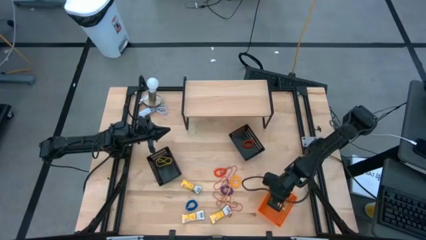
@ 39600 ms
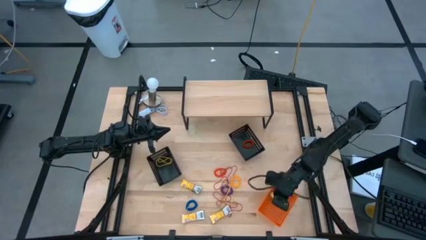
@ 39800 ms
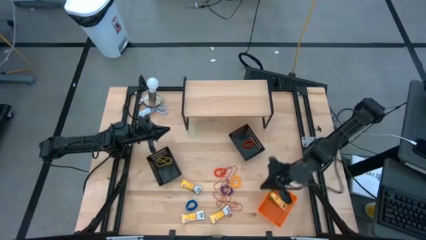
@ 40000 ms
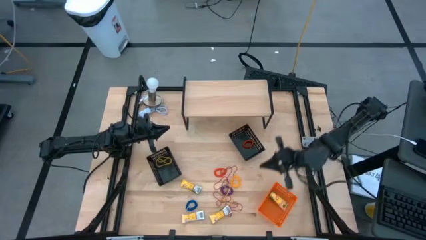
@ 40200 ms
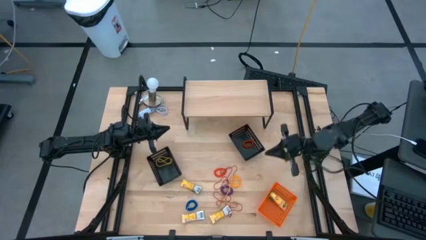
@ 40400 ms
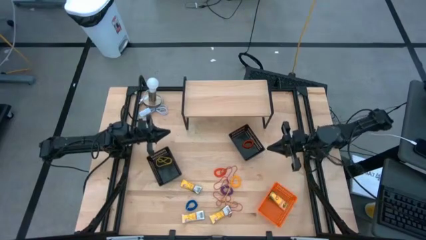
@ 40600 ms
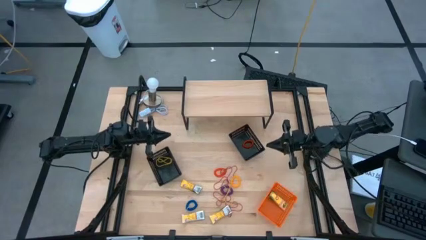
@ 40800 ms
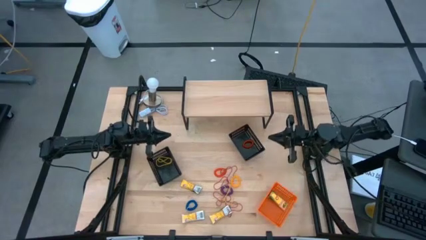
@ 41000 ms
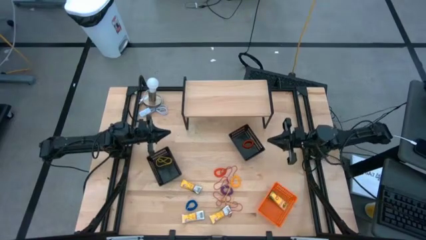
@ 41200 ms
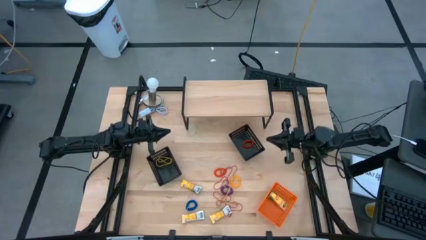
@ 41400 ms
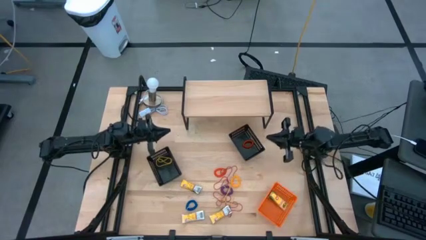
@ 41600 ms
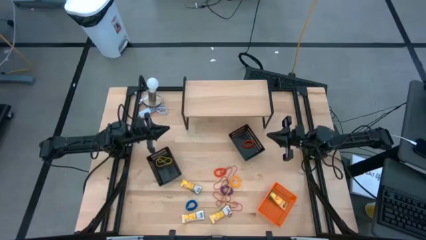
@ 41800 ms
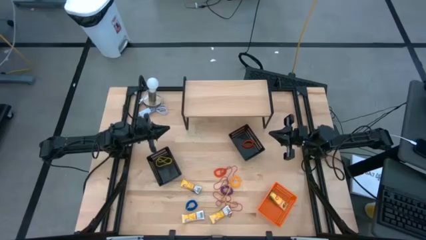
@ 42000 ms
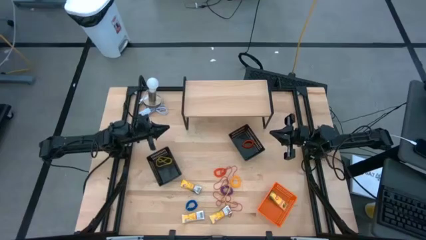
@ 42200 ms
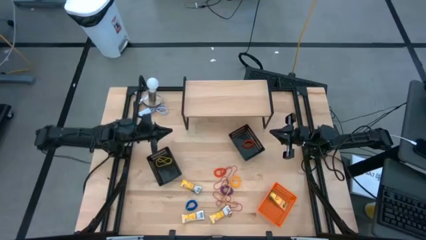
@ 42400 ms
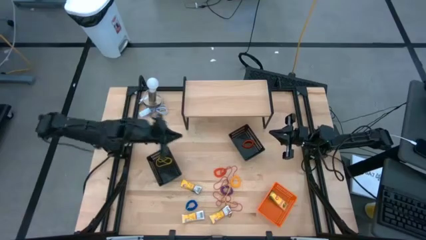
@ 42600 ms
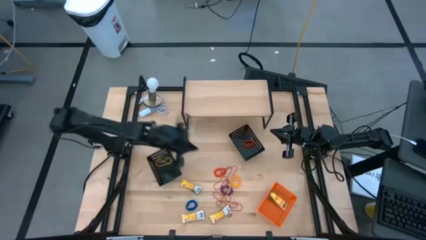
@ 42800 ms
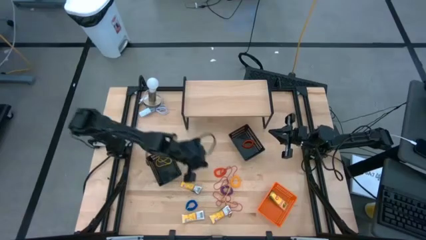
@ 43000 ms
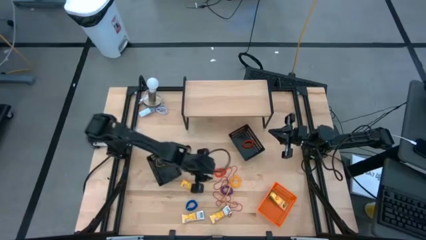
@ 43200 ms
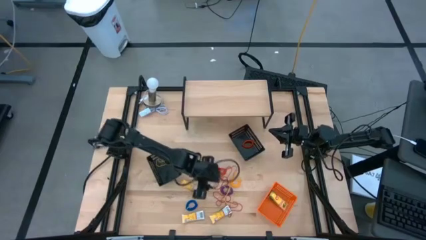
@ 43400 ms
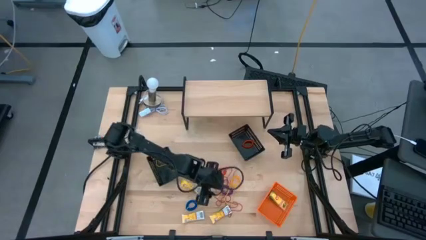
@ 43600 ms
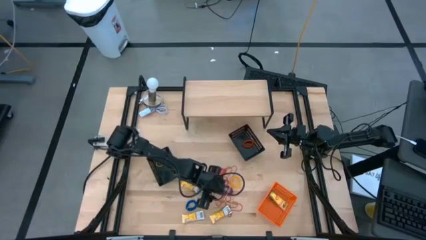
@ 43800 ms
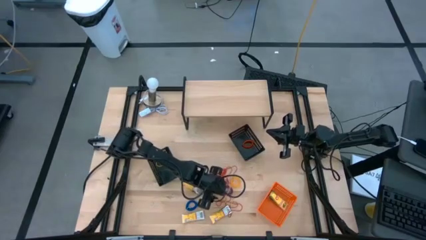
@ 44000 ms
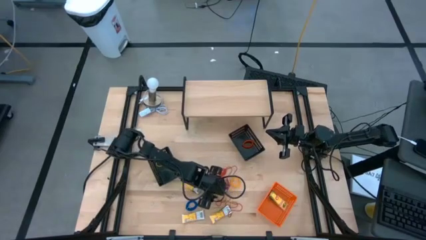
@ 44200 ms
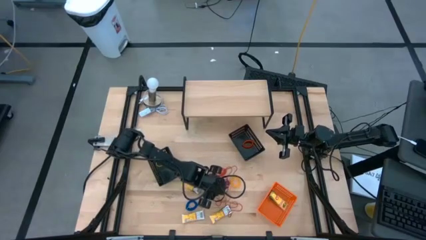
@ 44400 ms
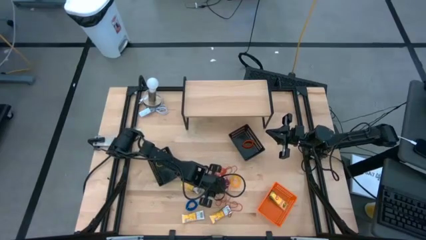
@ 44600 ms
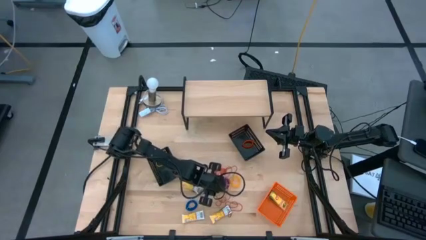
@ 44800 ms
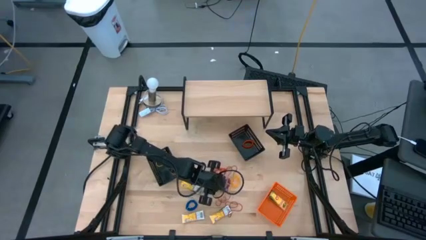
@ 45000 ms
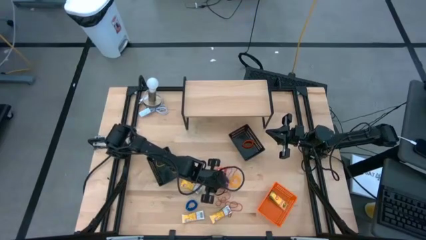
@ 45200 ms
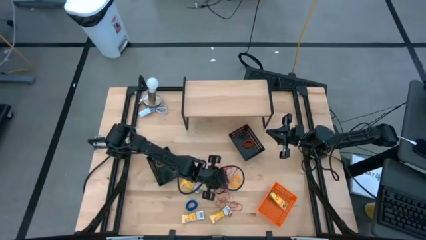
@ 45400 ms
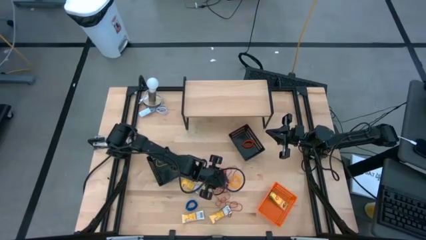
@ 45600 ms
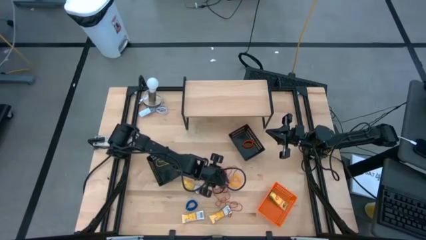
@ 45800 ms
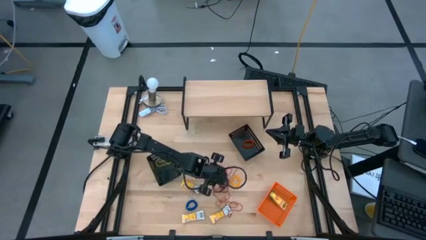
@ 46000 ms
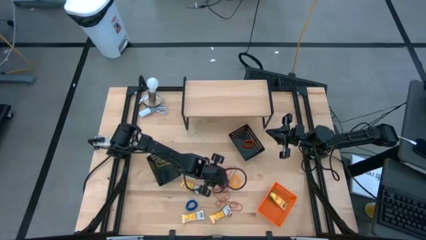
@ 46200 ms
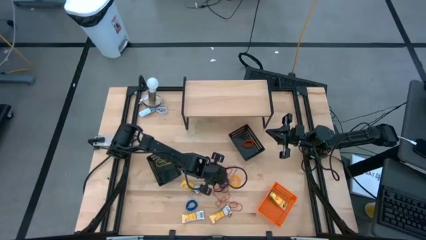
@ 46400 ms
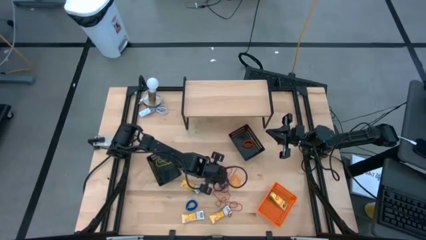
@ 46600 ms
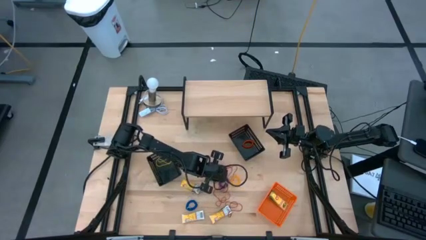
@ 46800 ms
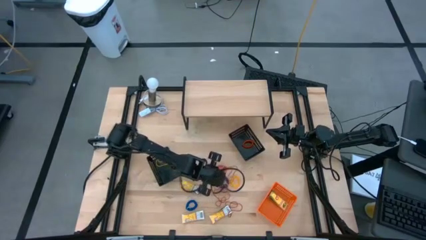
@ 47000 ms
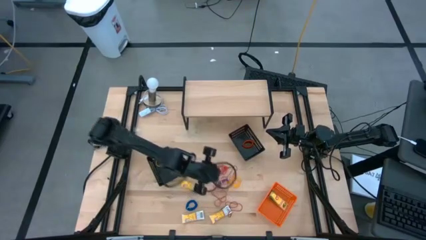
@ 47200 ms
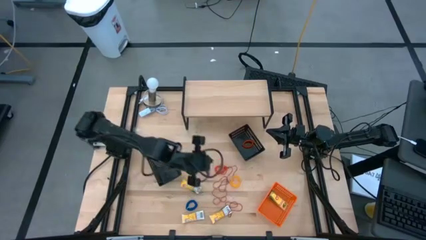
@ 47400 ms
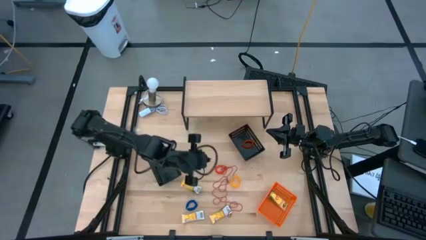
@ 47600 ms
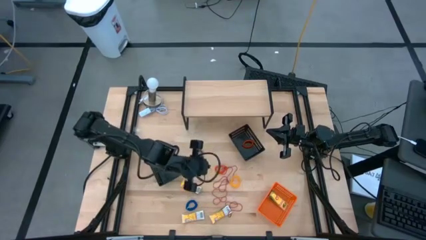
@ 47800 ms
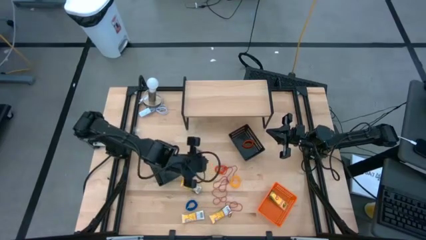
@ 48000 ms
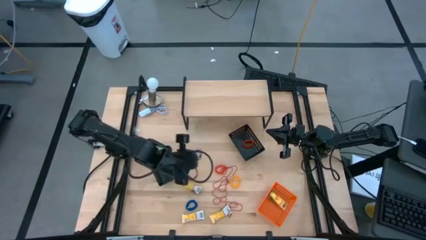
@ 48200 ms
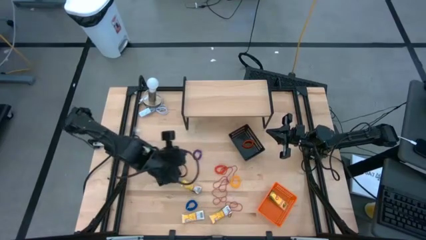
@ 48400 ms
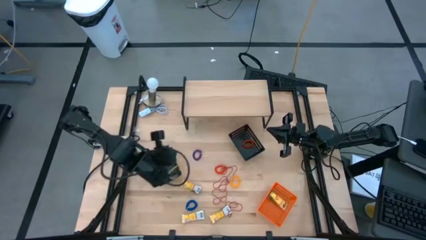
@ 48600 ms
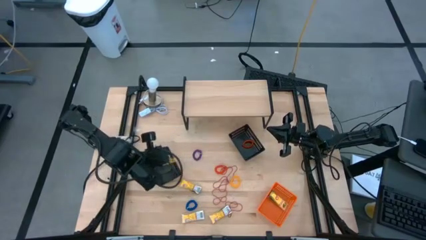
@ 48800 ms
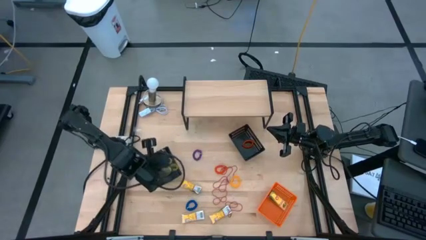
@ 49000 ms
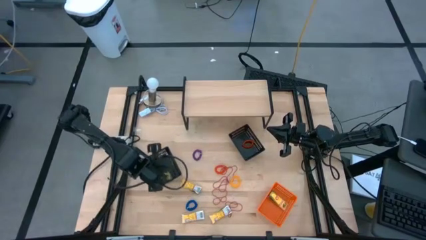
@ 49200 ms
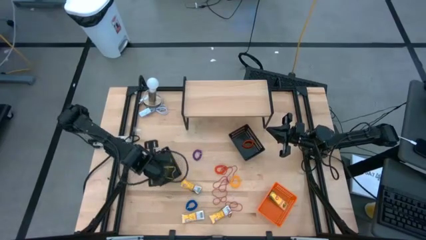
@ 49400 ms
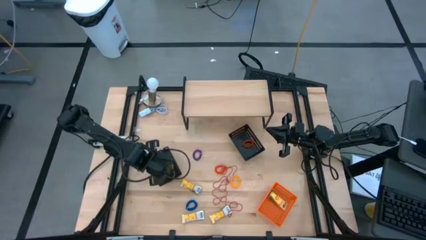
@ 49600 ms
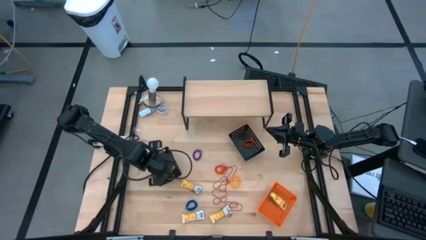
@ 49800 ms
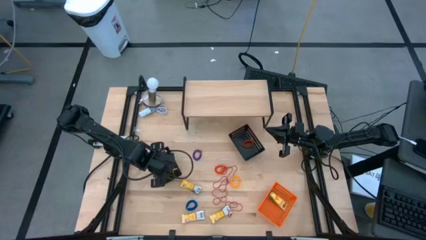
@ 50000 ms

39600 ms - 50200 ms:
Task: Pick & Place Office Desk Supplies
Put the yellow rubber band into the left black bin
